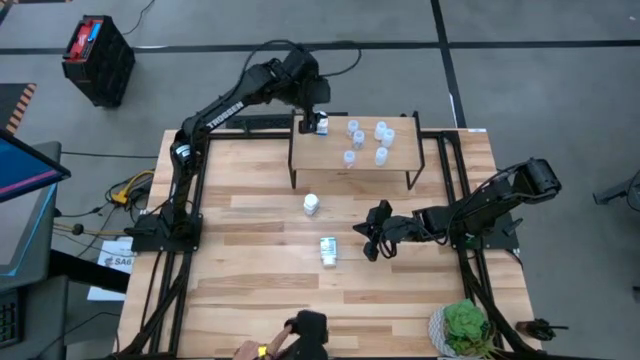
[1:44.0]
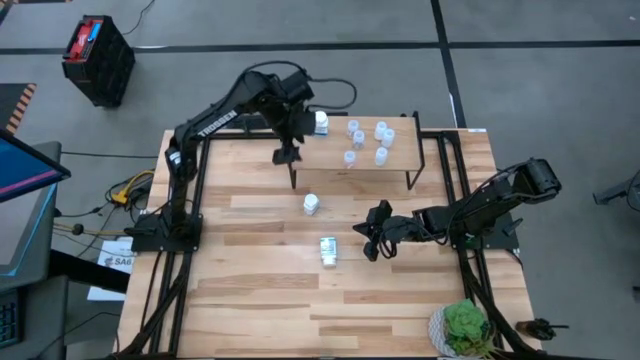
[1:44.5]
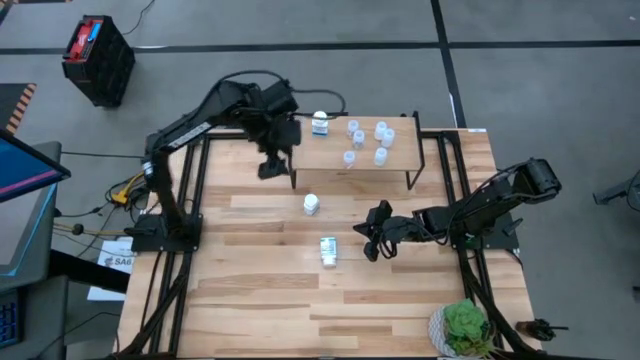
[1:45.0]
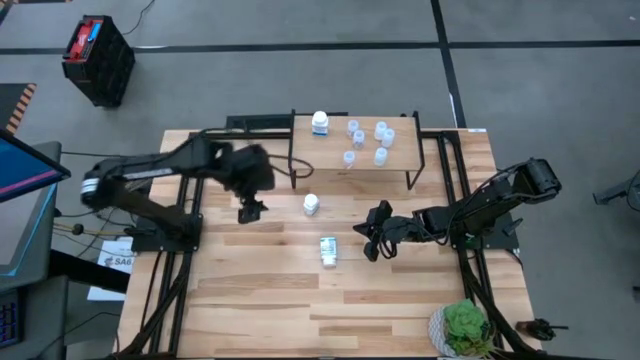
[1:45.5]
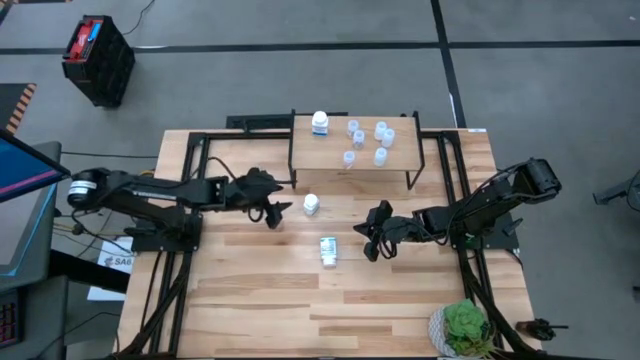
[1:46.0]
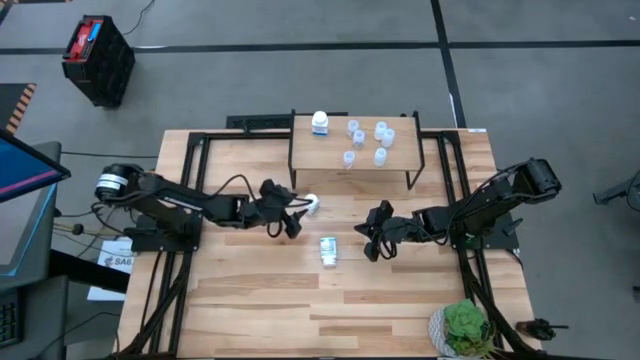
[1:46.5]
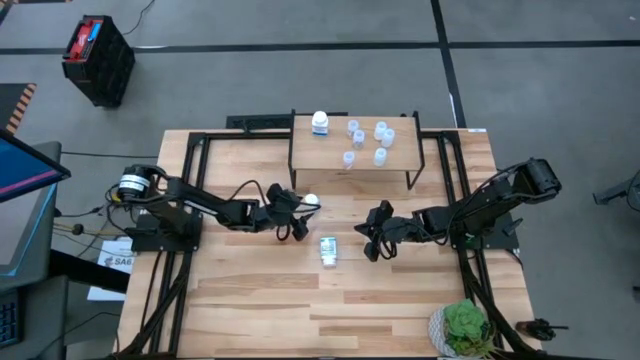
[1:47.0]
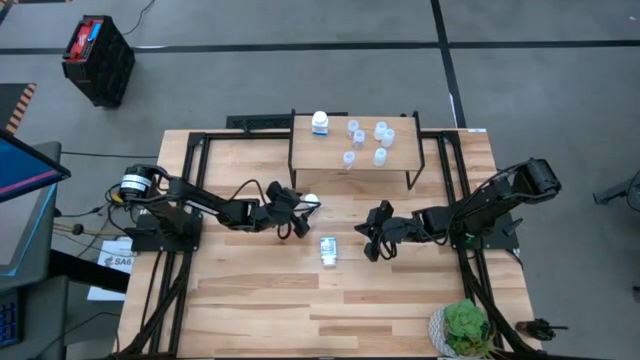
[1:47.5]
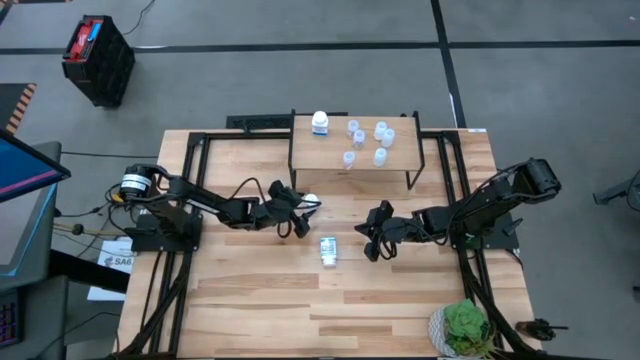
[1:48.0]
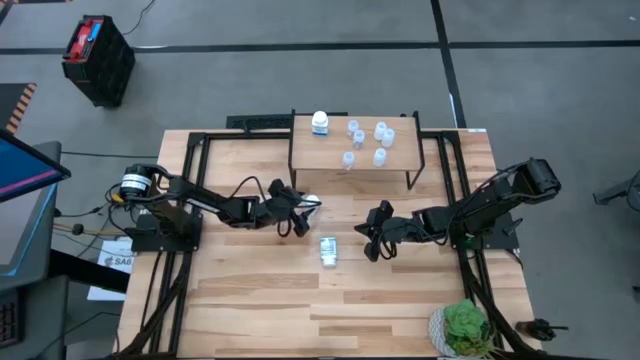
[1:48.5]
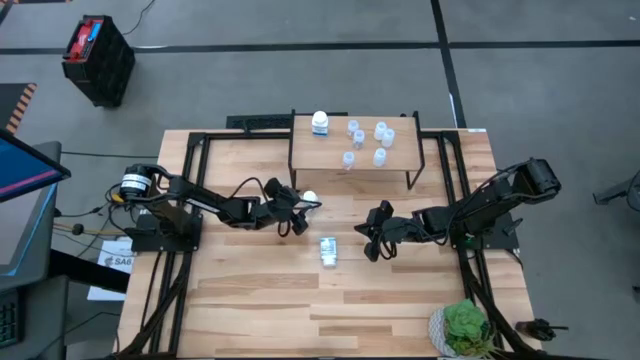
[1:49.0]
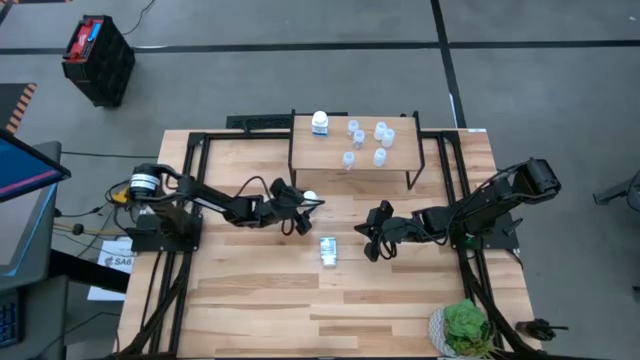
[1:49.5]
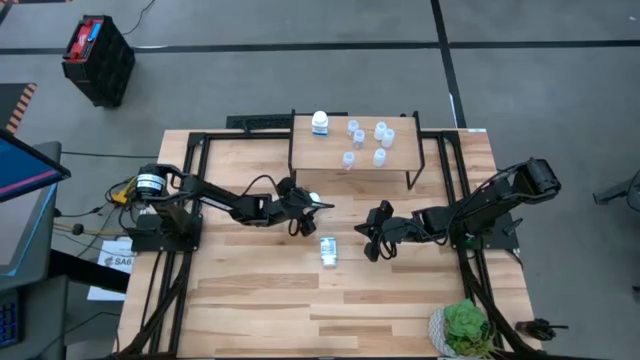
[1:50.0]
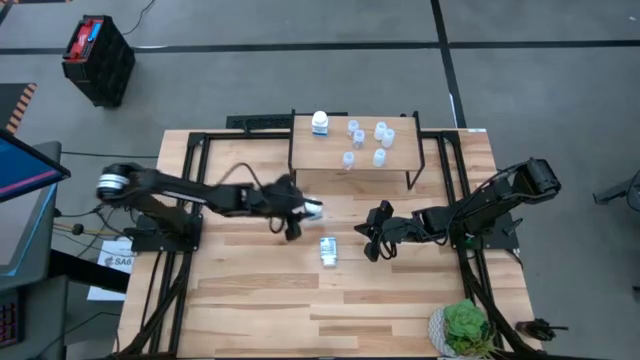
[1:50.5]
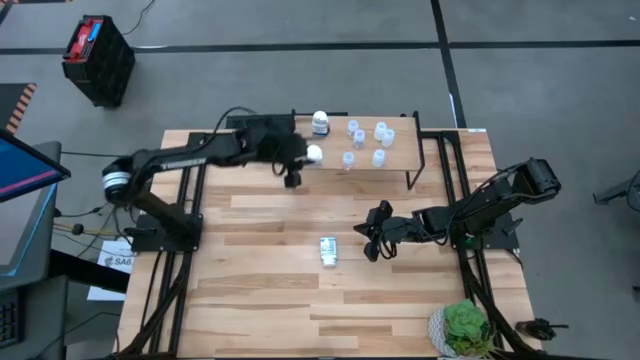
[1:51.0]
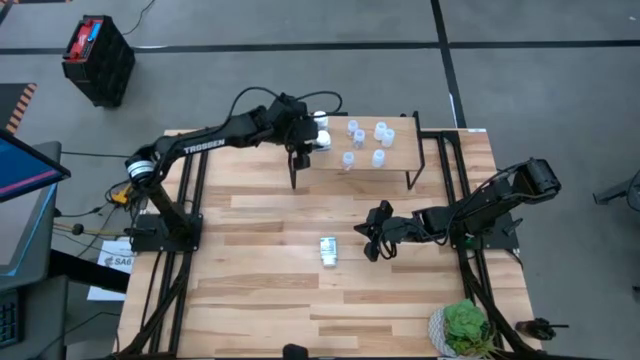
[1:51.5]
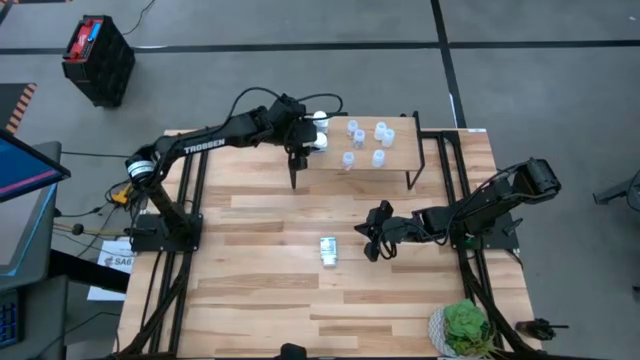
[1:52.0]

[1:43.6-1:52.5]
Task: Pick and place medicine bottles onto shelf by color
Put the top white blue pill bottle on the shelf

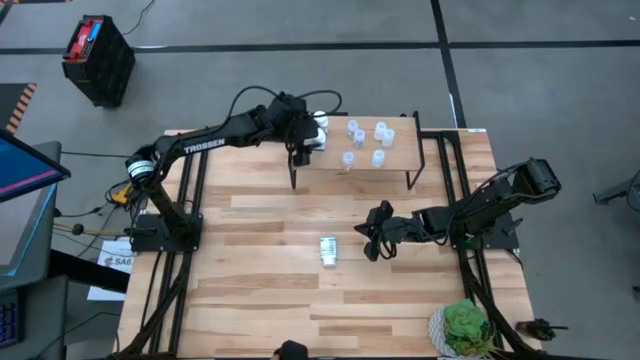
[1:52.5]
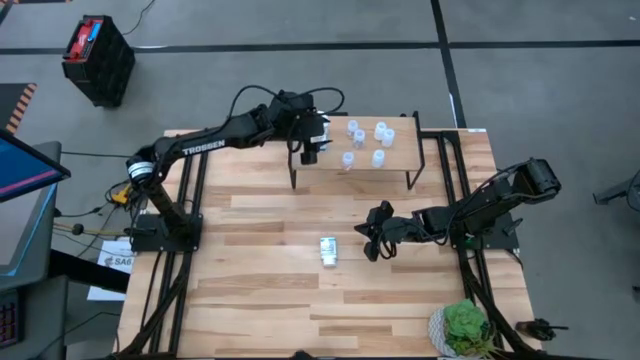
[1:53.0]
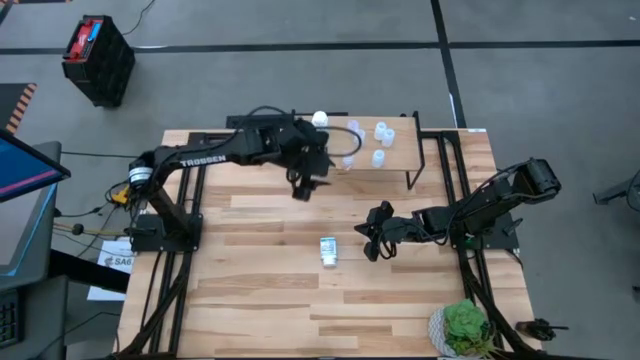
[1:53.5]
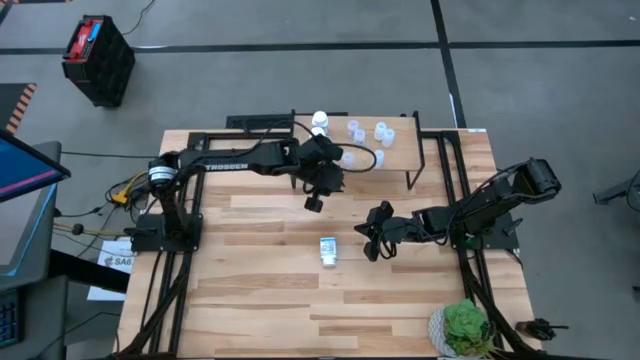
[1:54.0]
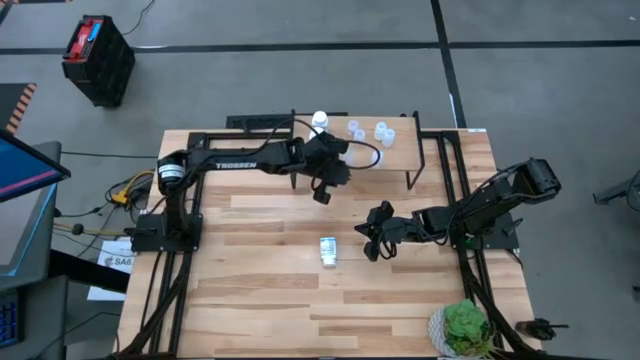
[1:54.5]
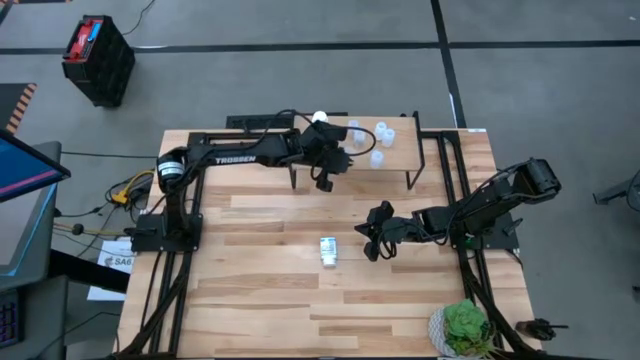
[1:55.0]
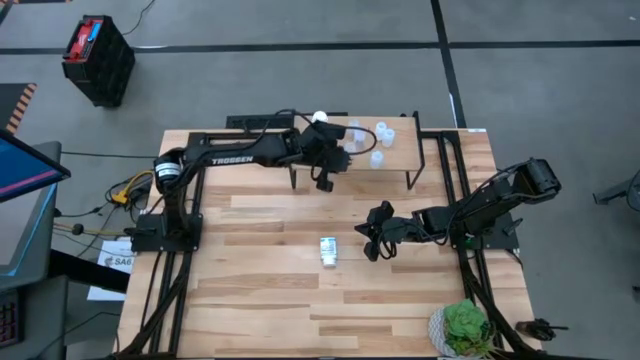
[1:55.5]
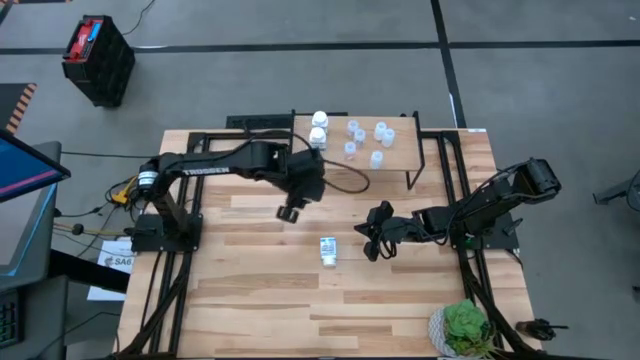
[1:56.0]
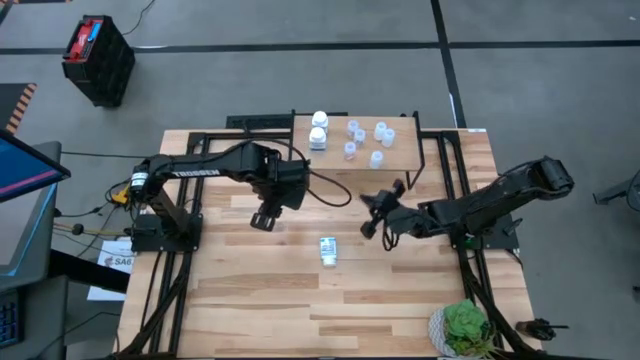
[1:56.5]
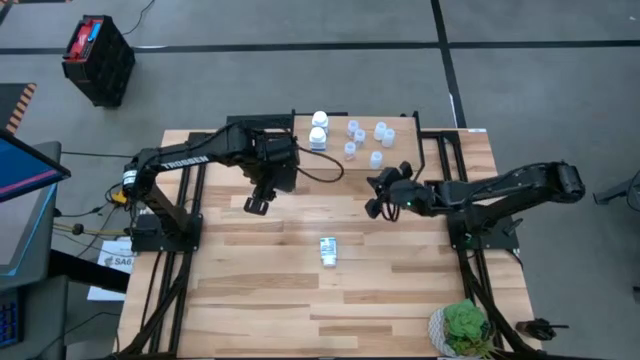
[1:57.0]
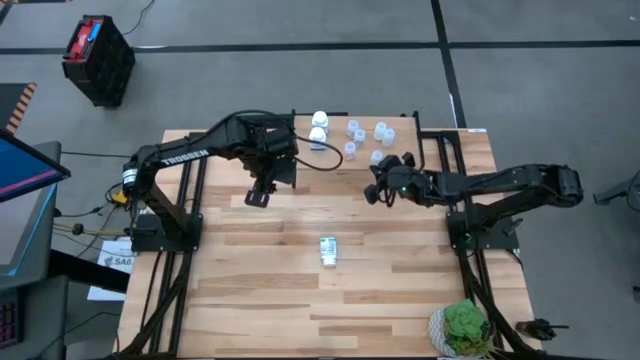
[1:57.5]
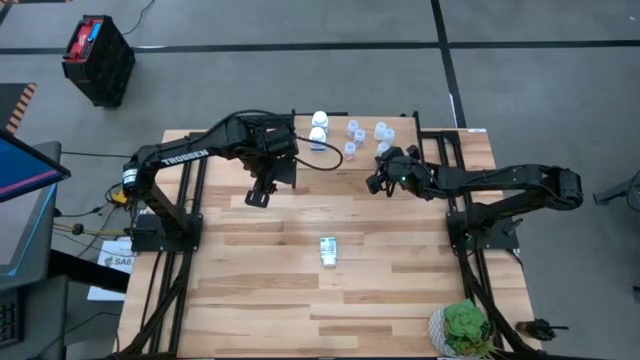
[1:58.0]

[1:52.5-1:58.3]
Adjust the pill bottles on the shelf

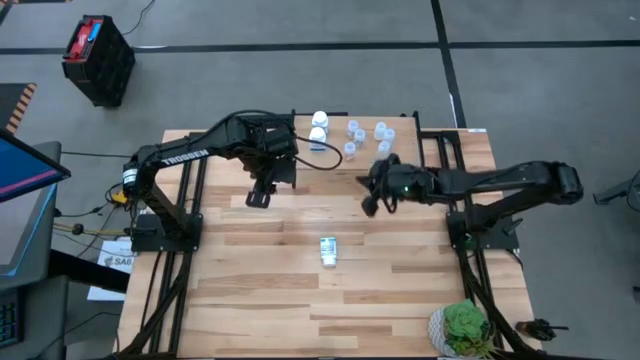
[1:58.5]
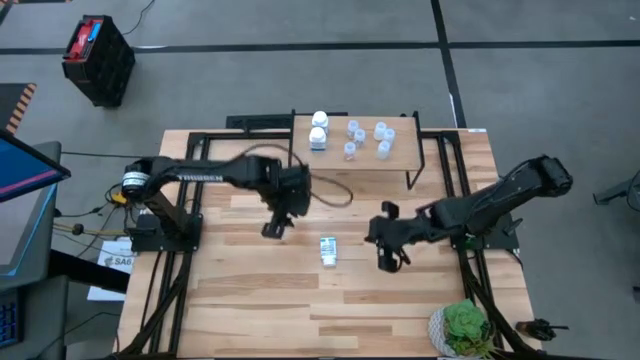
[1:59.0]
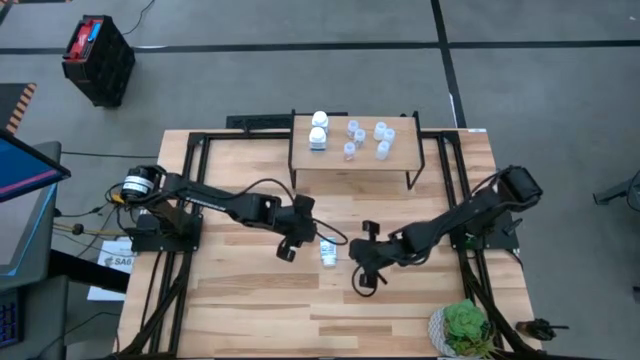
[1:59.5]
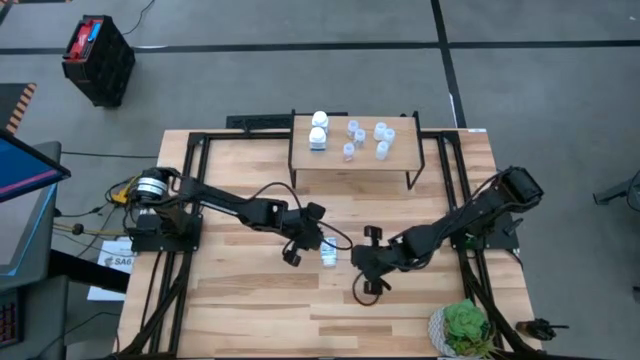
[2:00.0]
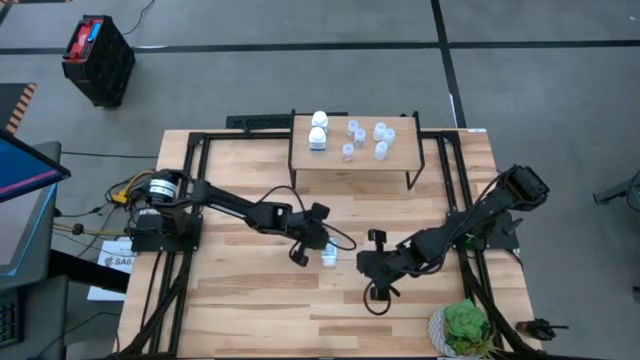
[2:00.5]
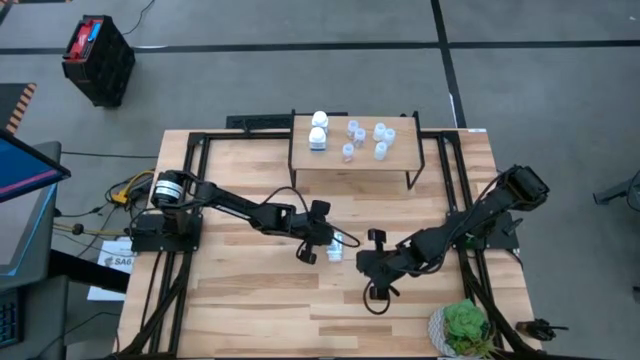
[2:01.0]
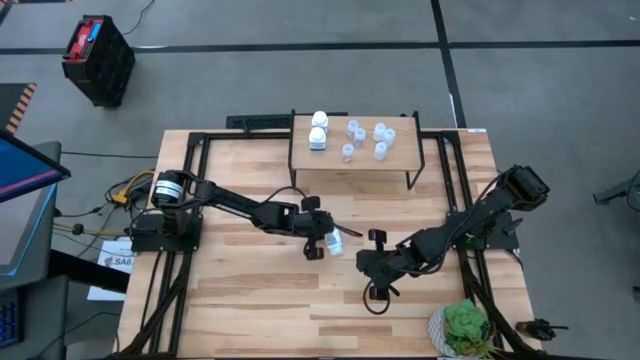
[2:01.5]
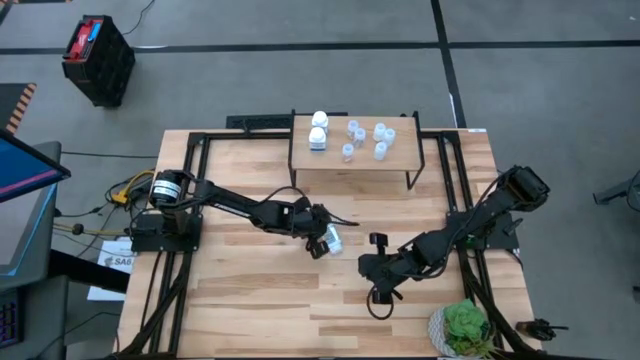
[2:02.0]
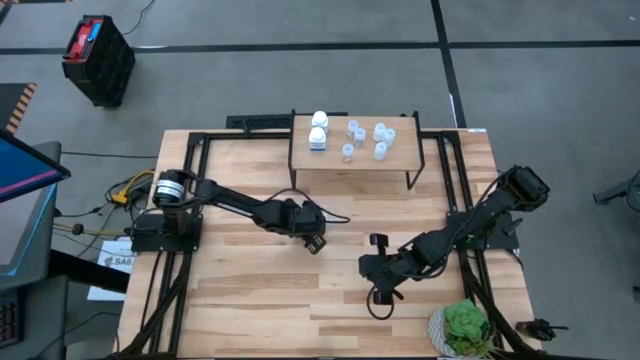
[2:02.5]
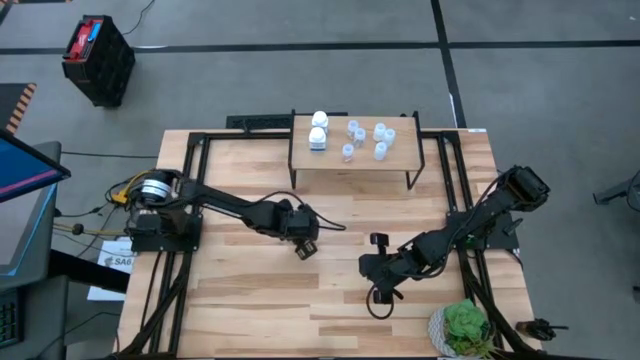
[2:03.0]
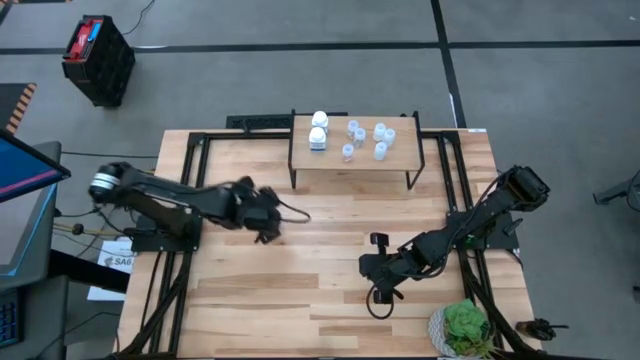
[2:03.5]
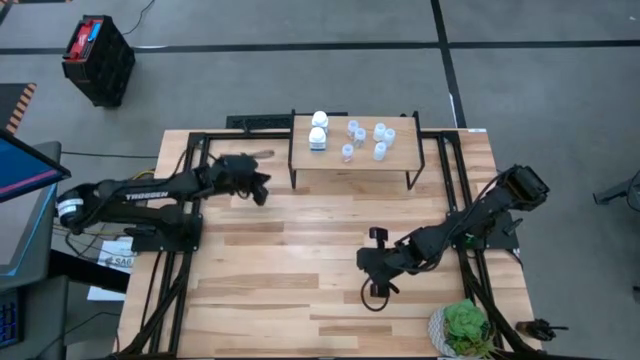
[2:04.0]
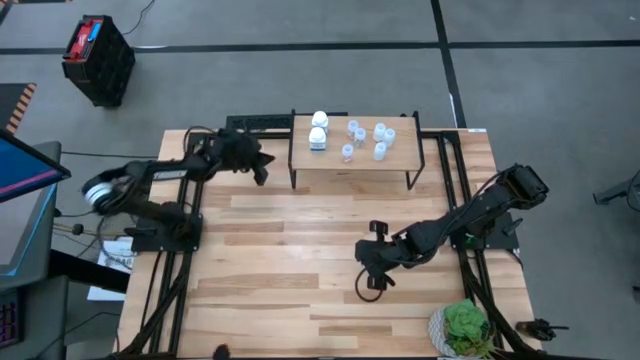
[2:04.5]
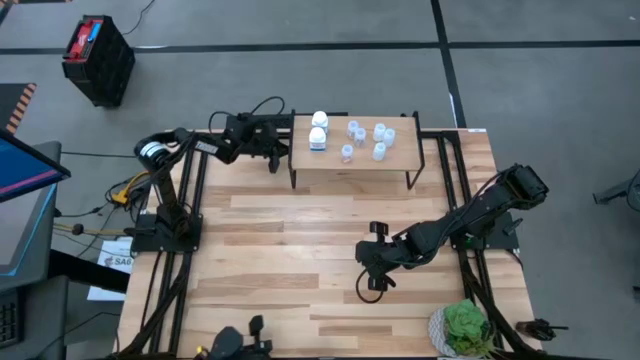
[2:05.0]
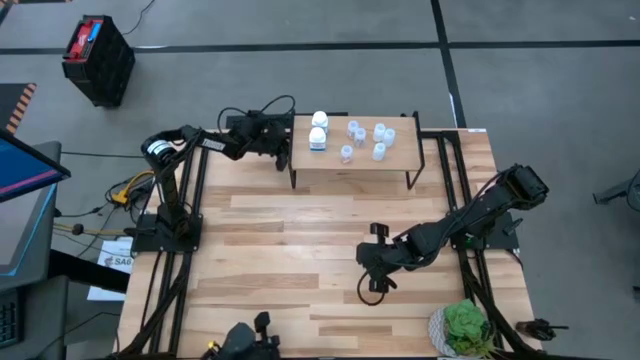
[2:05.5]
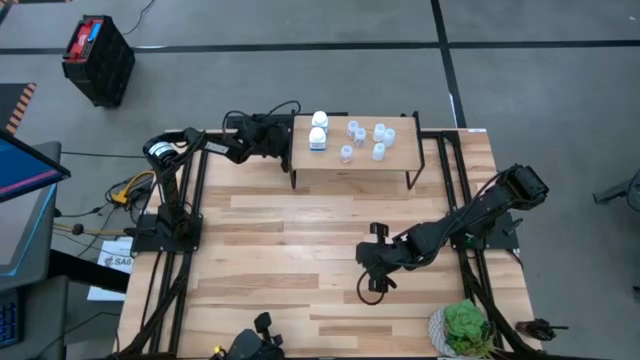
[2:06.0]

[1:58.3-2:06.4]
Put the white blue pill bottle on the shelf
